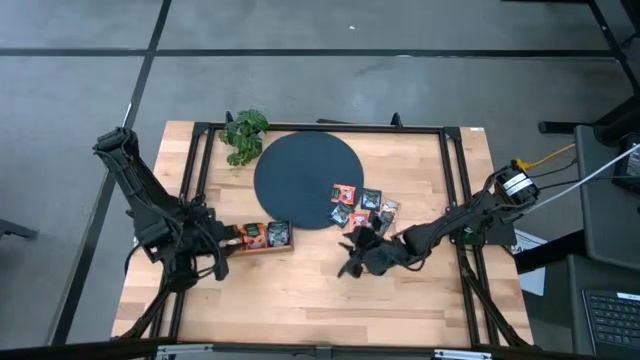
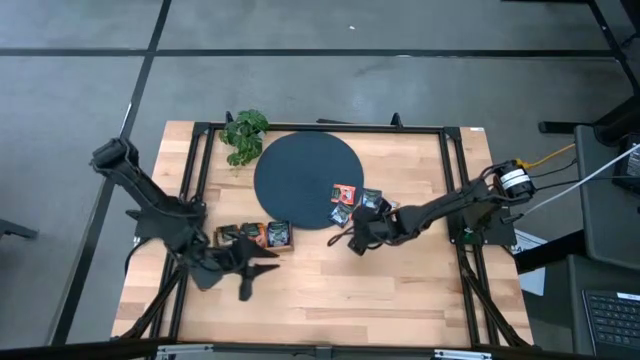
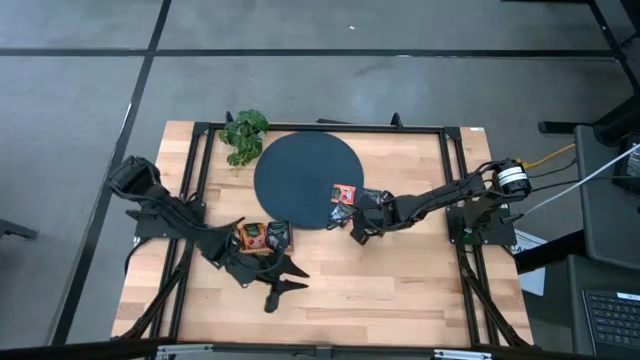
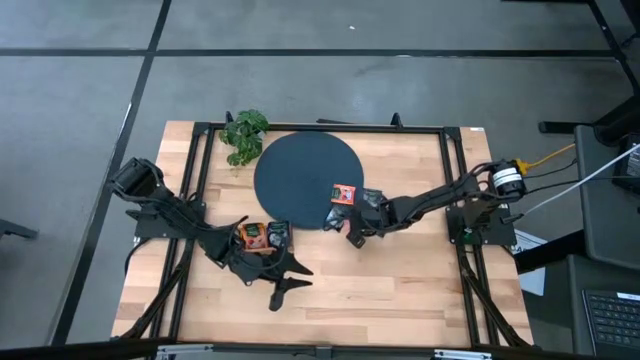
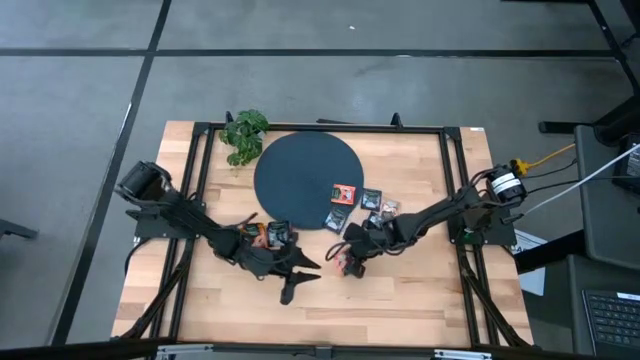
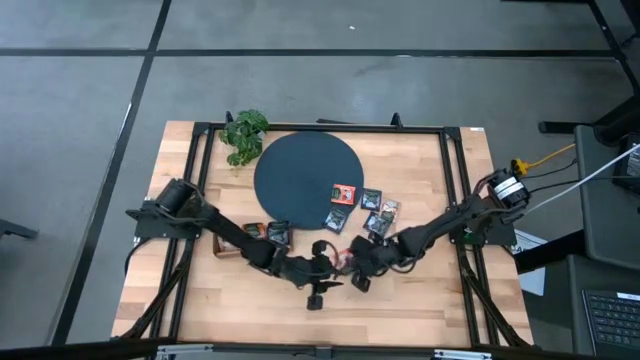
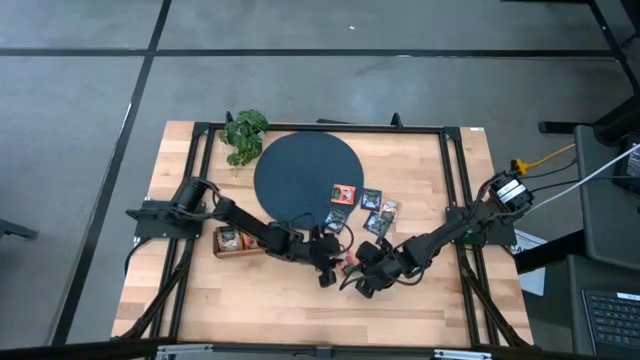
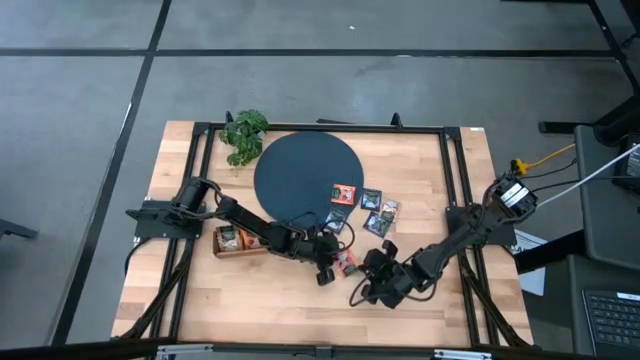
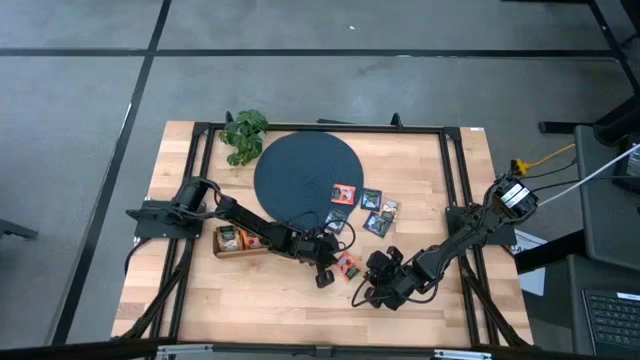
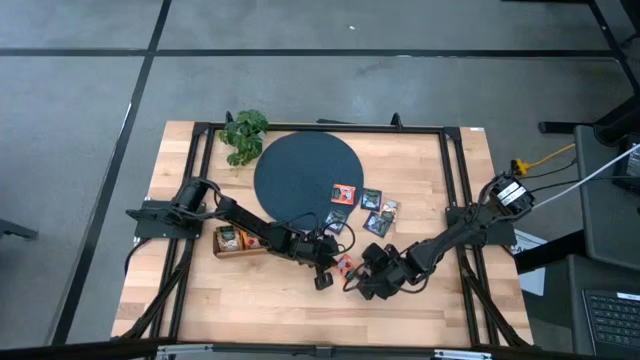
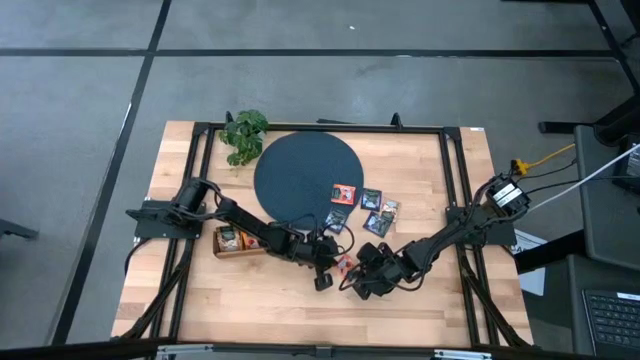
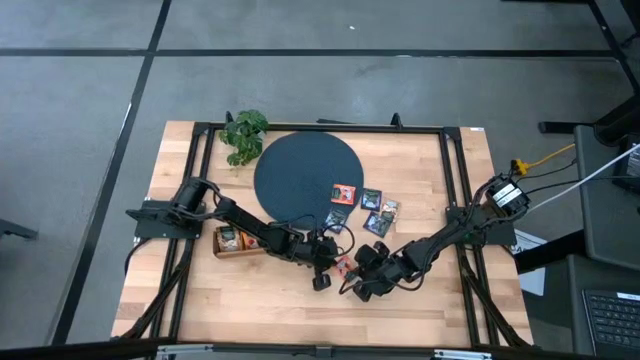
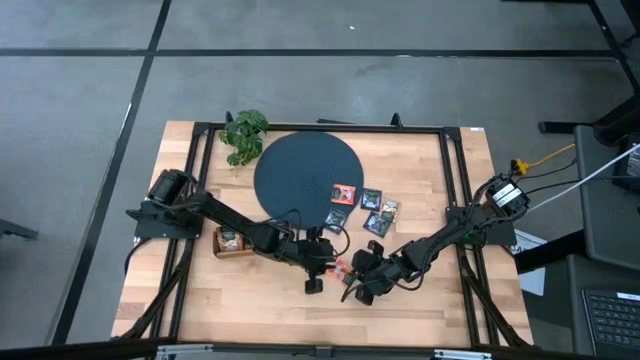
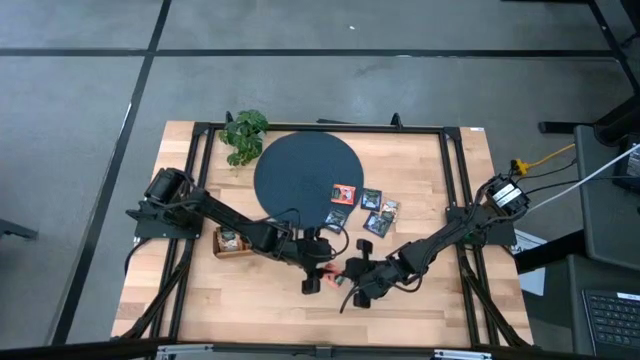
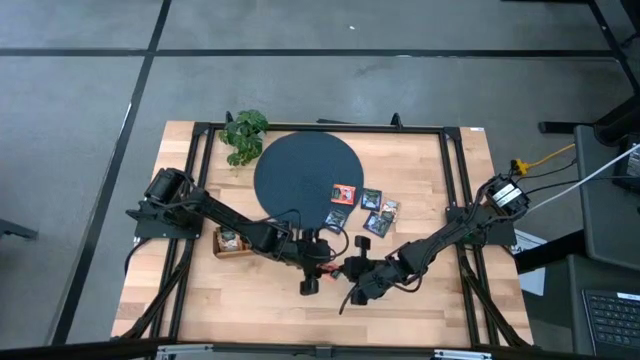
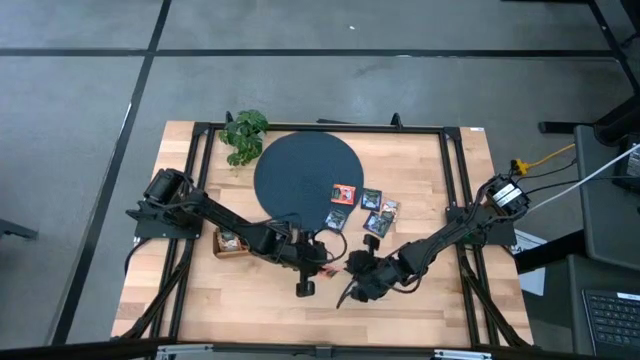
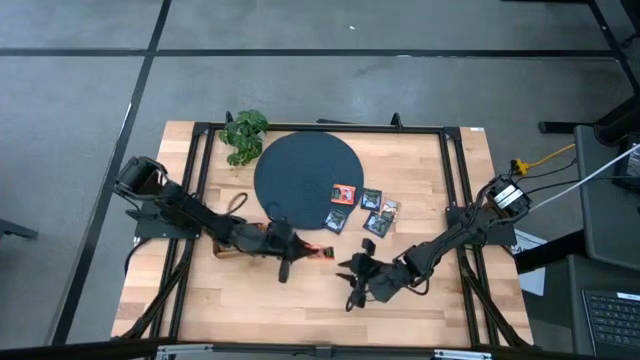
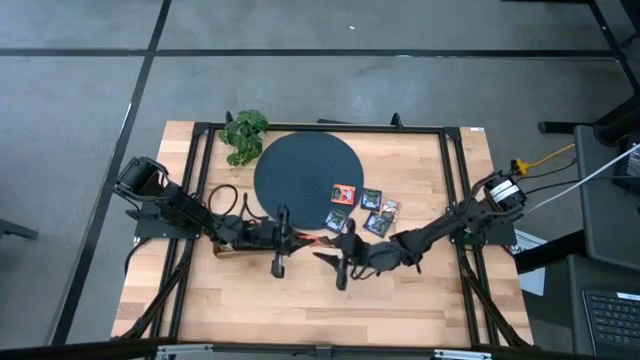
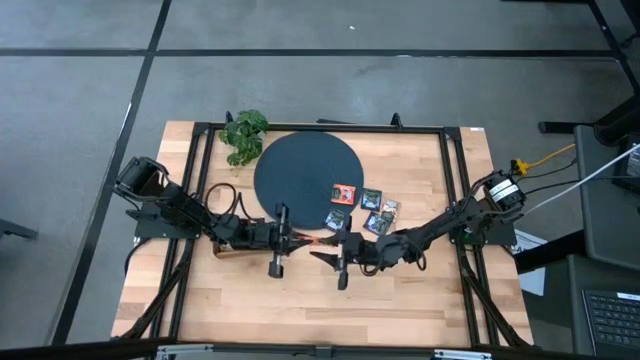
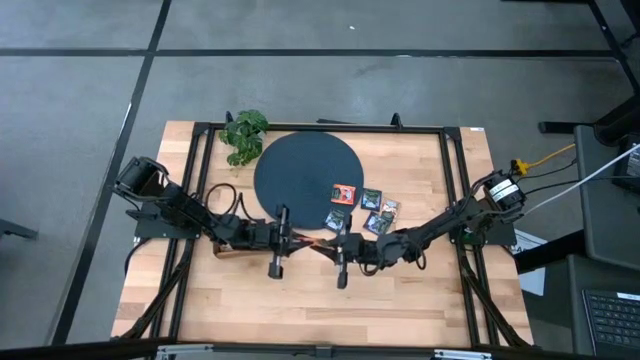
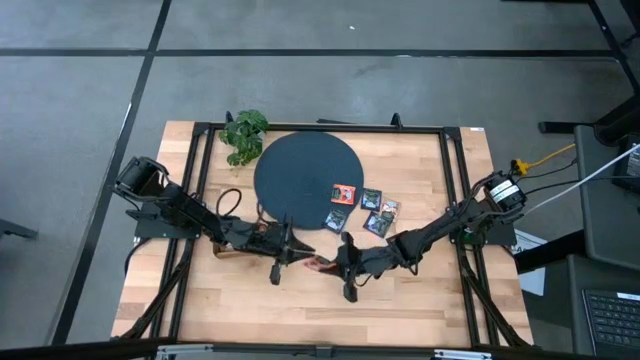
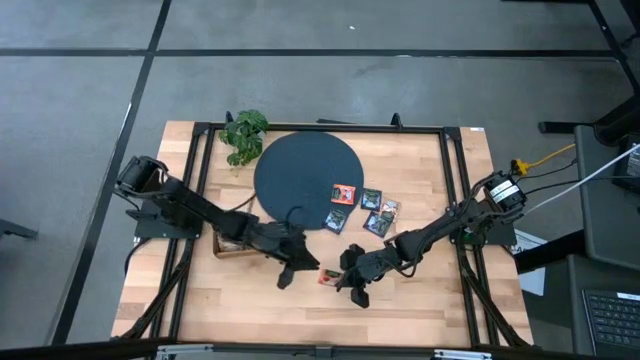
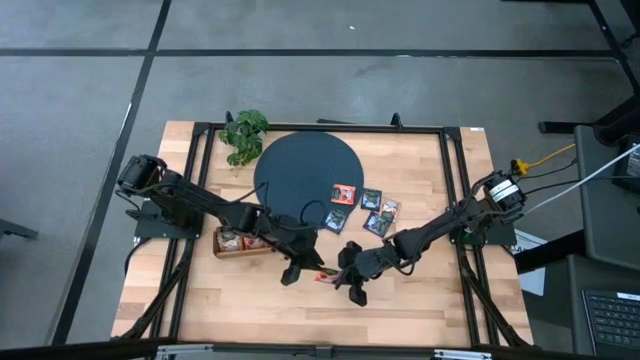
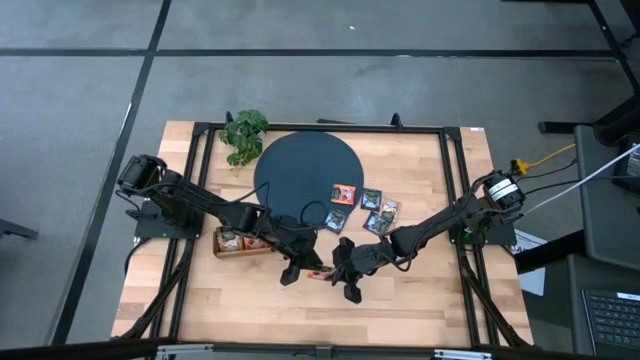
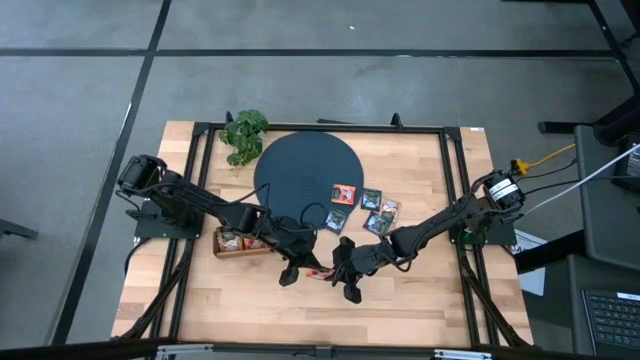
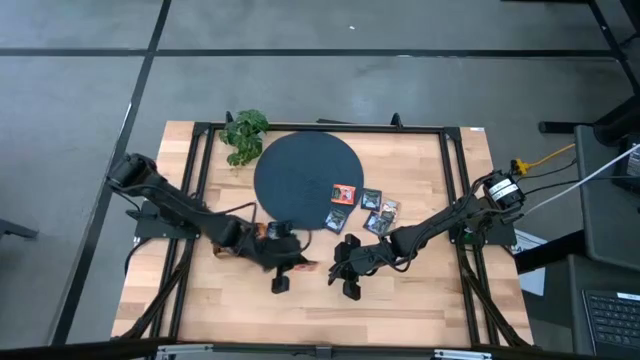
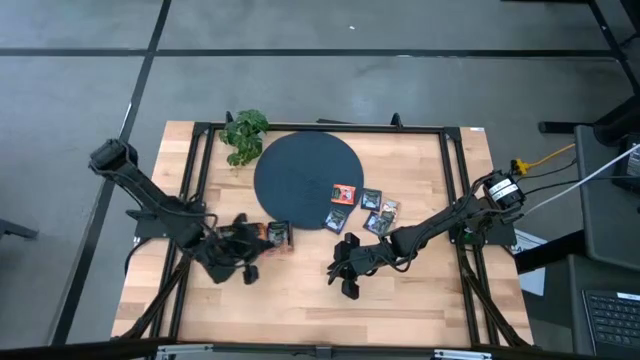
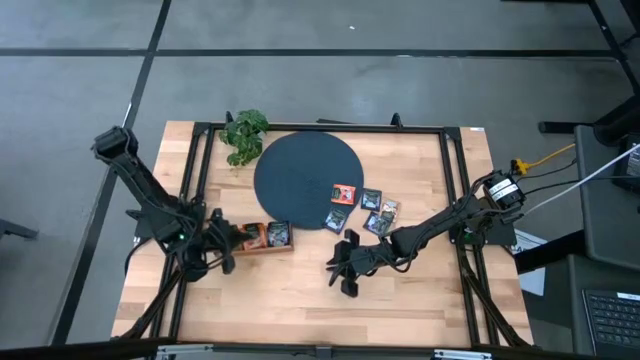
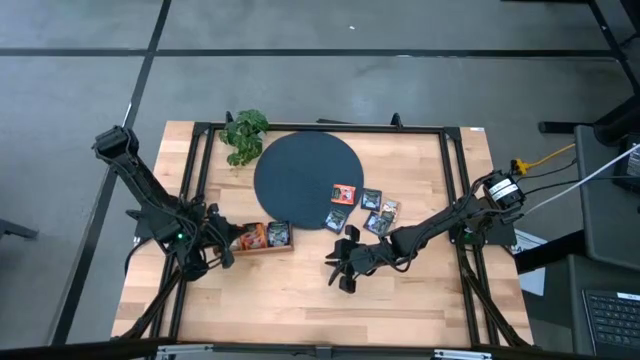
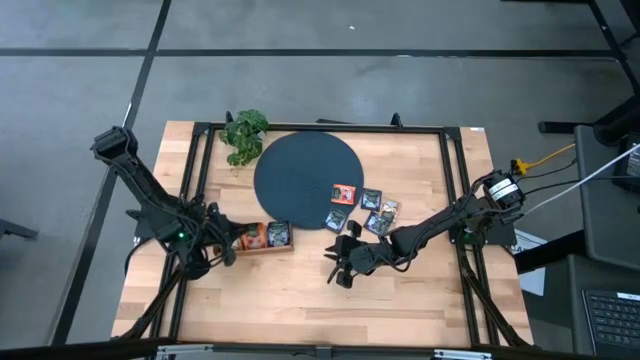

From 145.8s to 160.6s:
Task: Pick & Place Tea
Put the orange tea bag into the middle section of the wooden organizer

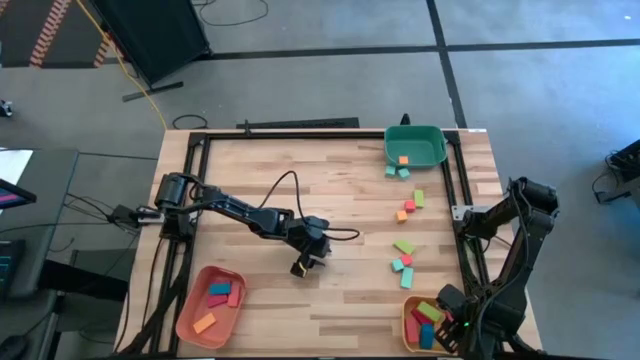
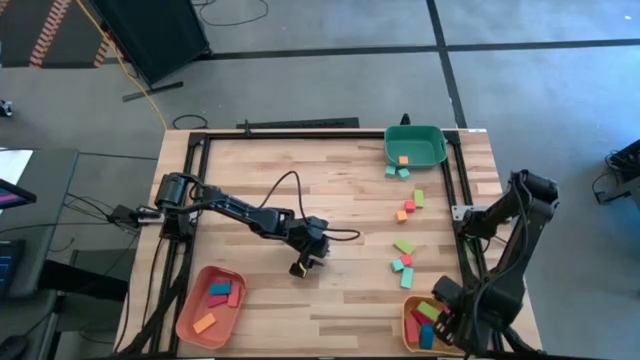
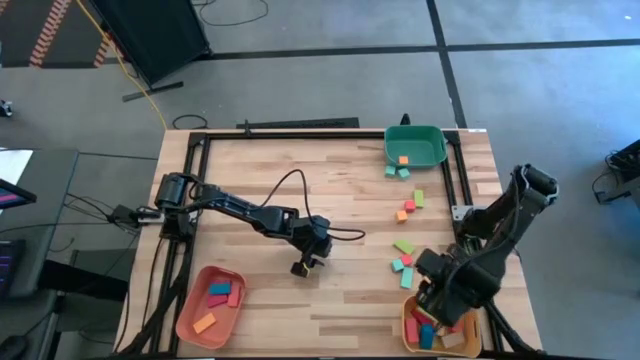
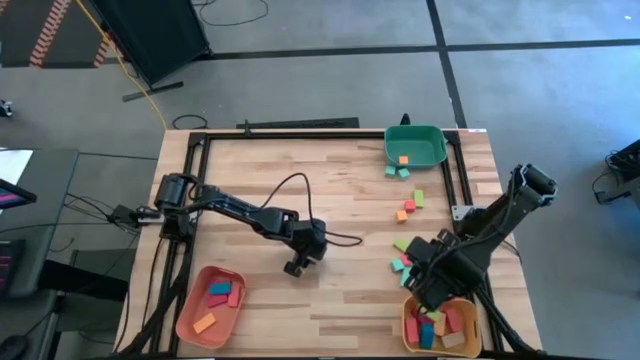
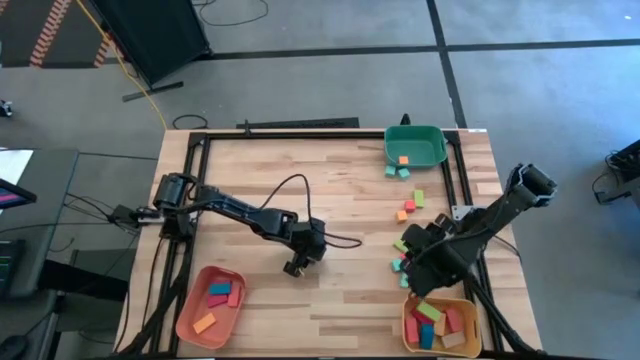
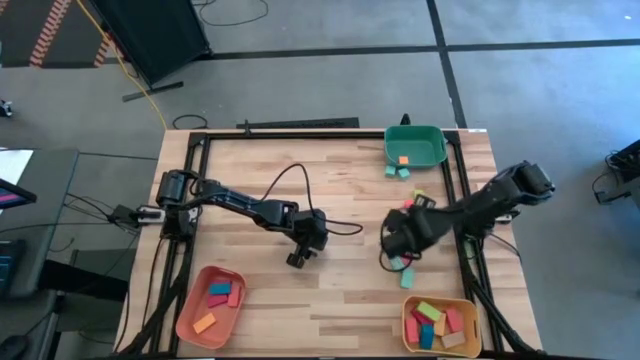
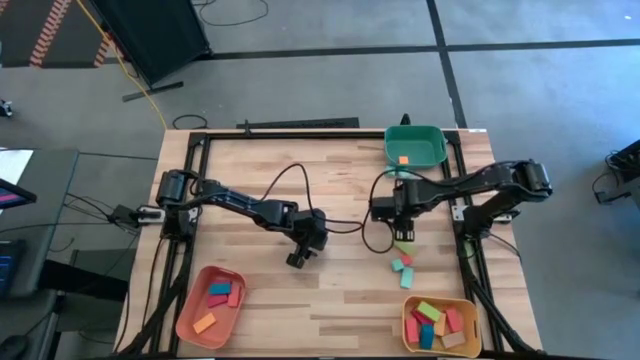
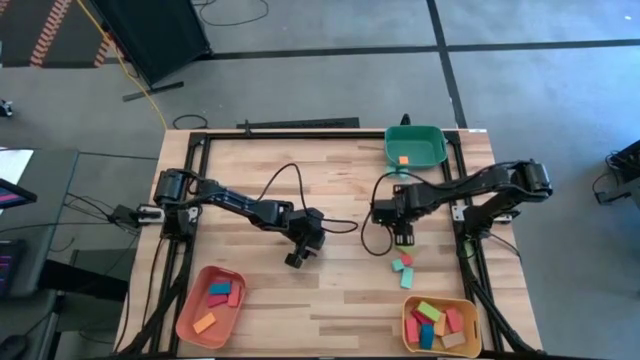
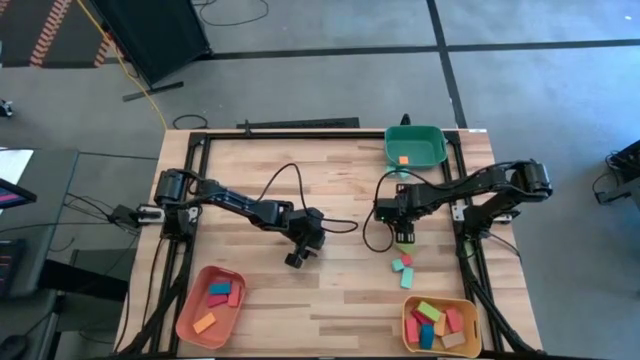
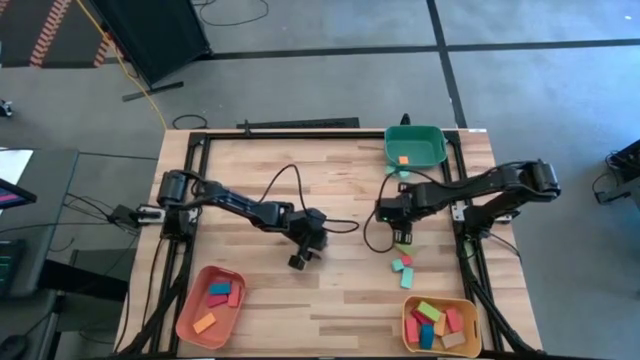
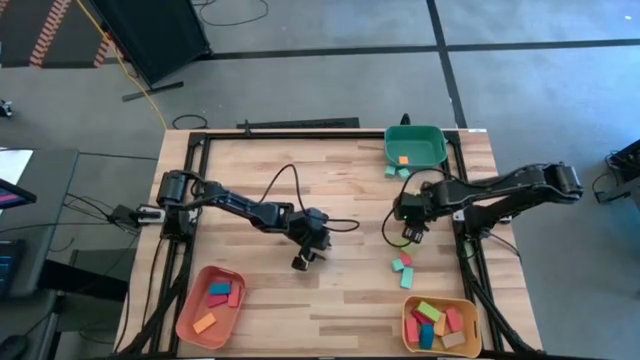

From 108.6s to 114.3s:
Task: Sort blocks by size
Put the small yellow square block into the blue bin

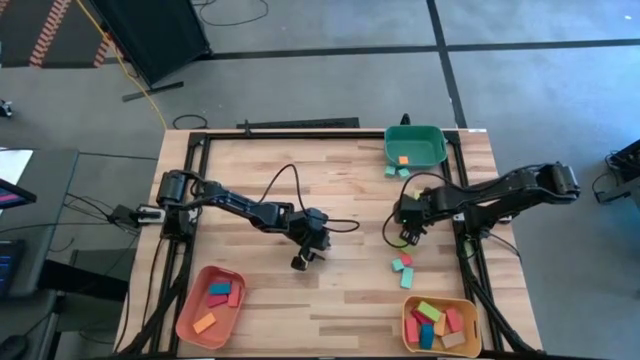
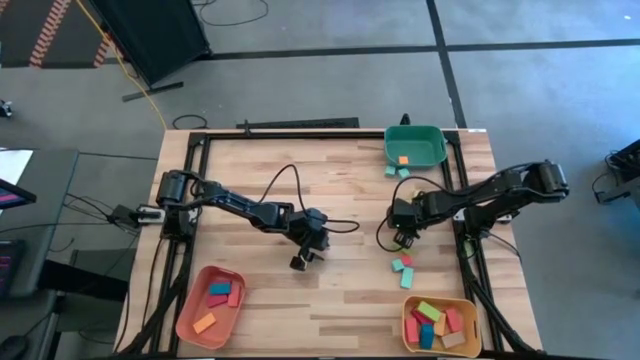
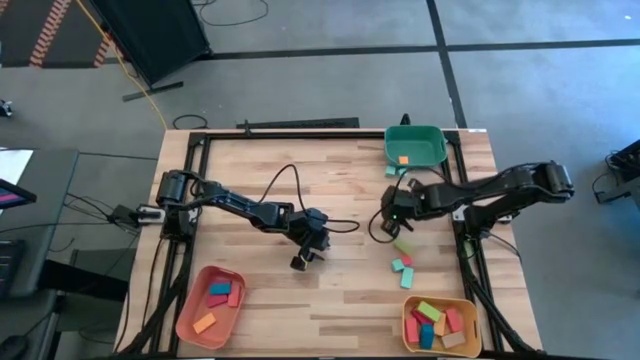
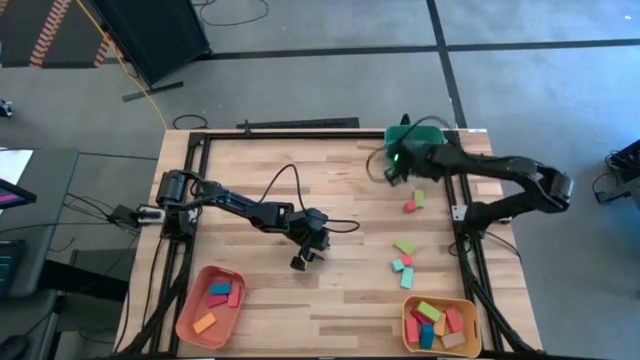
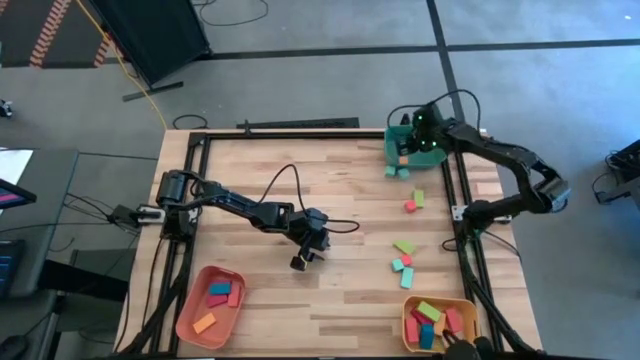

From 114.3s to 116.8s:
Put the small yellow square block into the blue bin
